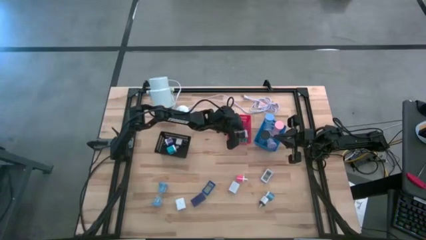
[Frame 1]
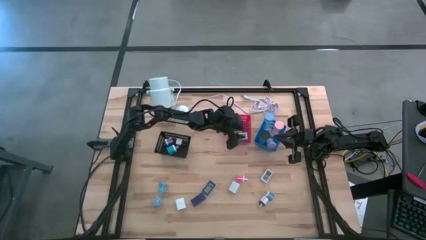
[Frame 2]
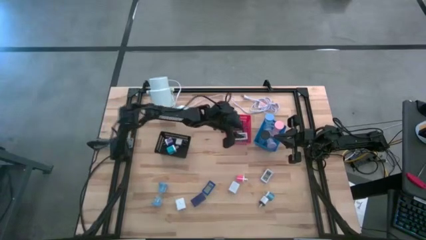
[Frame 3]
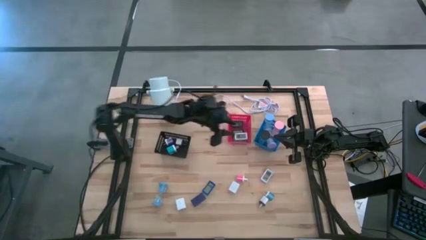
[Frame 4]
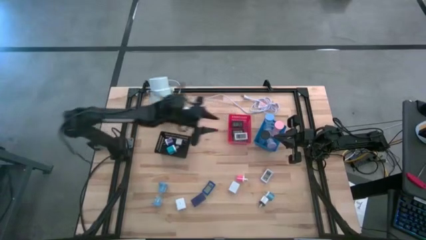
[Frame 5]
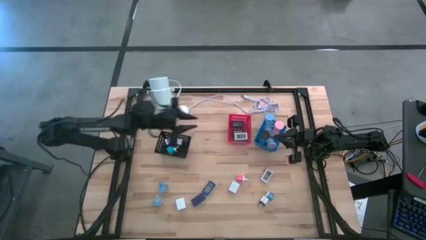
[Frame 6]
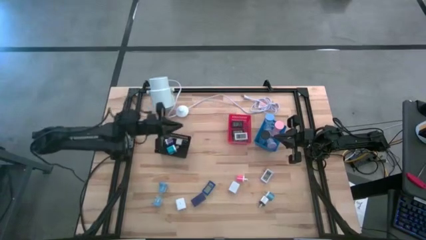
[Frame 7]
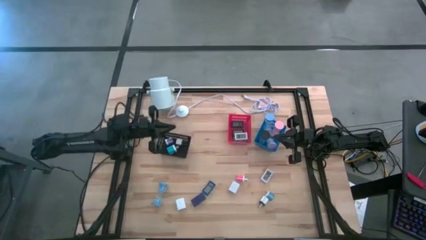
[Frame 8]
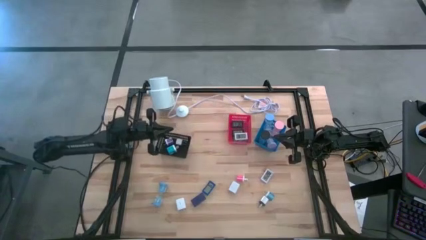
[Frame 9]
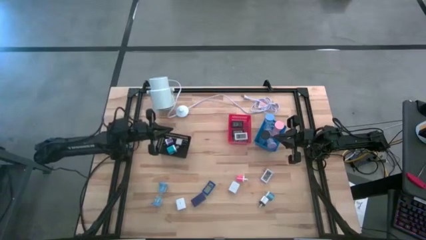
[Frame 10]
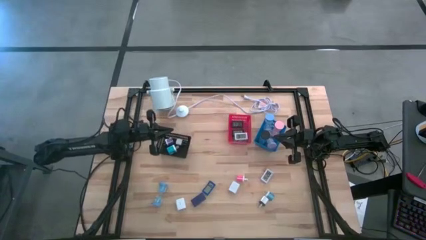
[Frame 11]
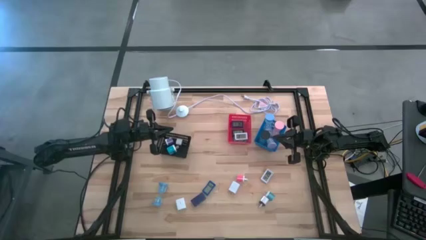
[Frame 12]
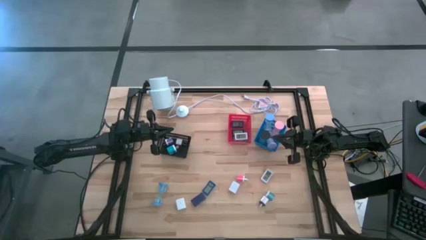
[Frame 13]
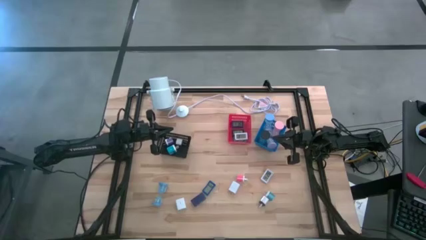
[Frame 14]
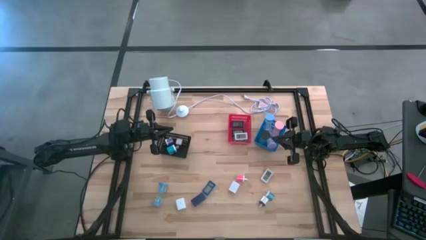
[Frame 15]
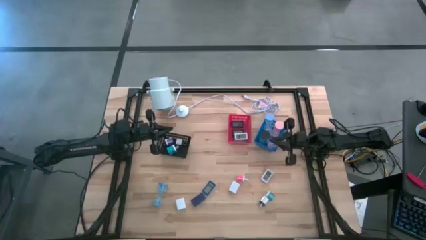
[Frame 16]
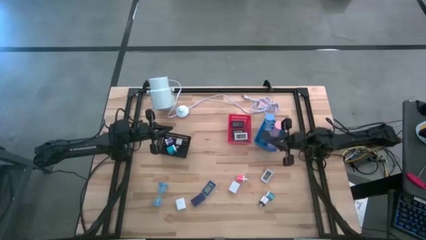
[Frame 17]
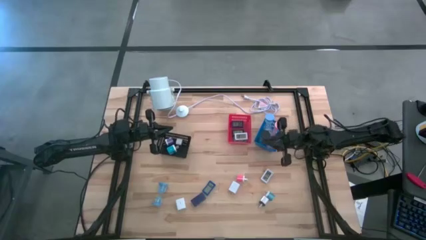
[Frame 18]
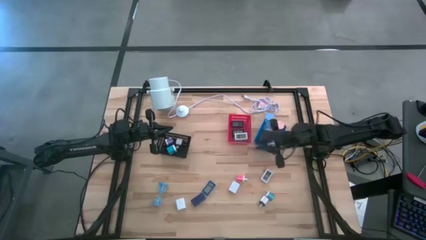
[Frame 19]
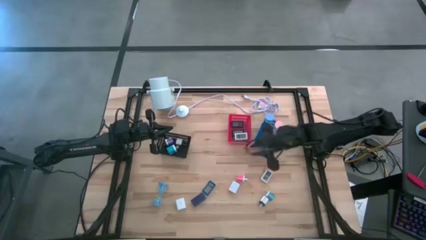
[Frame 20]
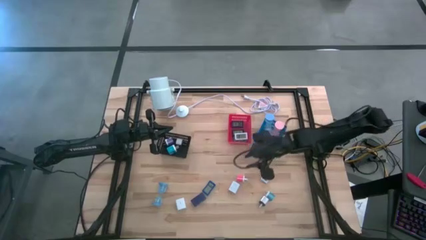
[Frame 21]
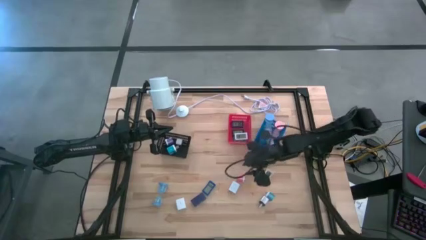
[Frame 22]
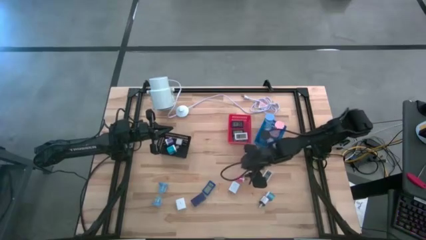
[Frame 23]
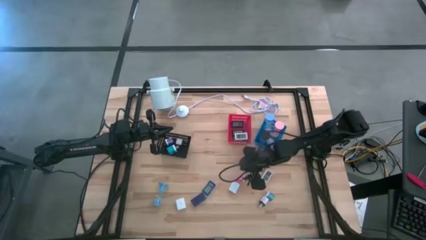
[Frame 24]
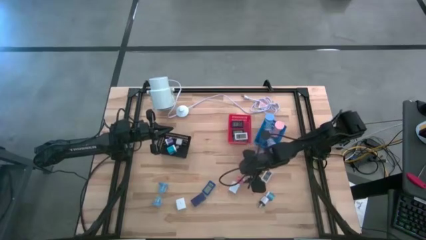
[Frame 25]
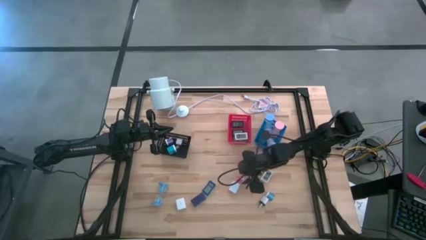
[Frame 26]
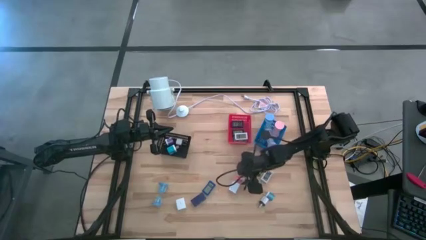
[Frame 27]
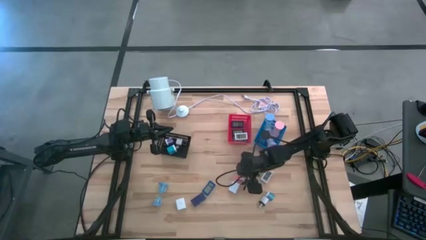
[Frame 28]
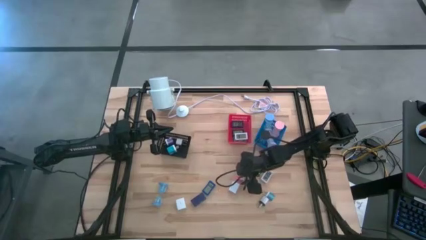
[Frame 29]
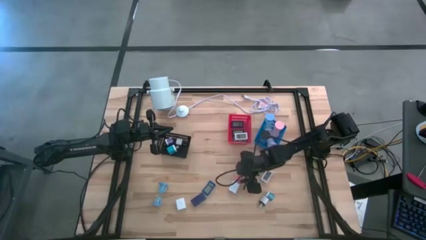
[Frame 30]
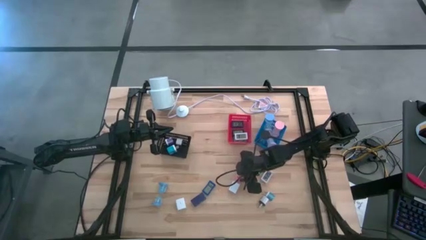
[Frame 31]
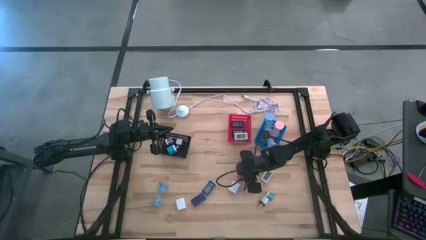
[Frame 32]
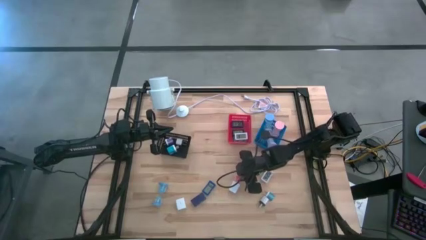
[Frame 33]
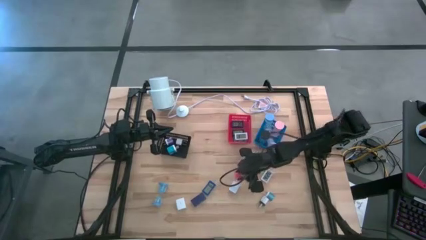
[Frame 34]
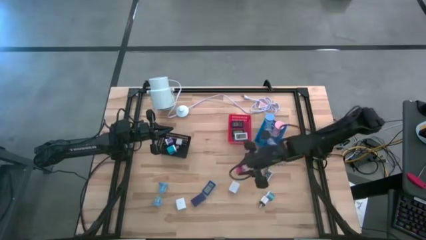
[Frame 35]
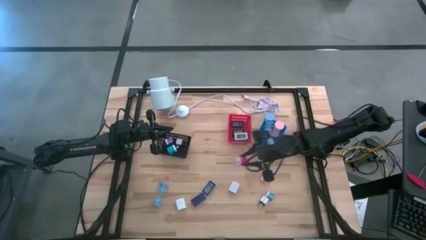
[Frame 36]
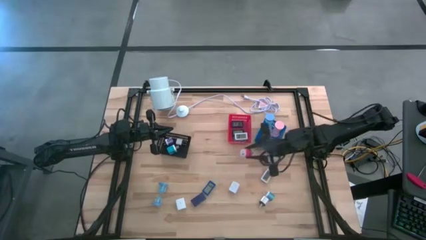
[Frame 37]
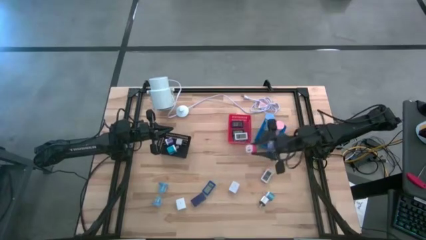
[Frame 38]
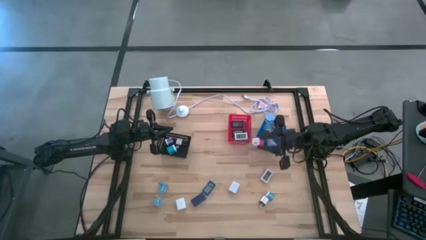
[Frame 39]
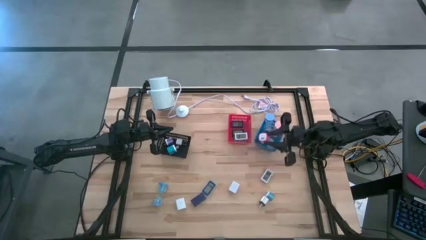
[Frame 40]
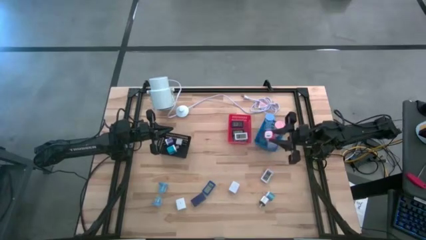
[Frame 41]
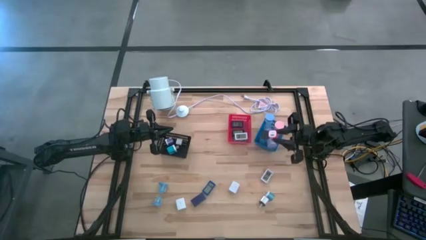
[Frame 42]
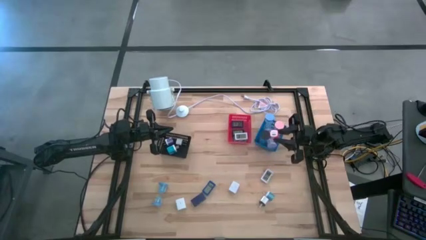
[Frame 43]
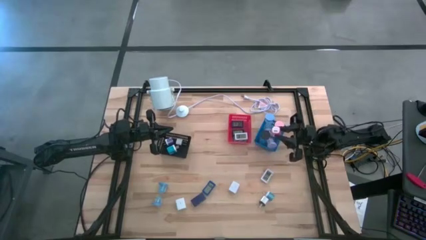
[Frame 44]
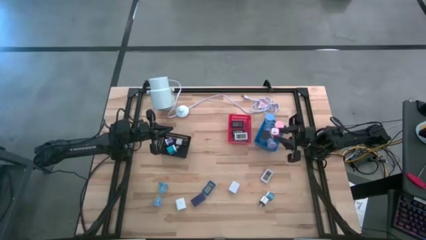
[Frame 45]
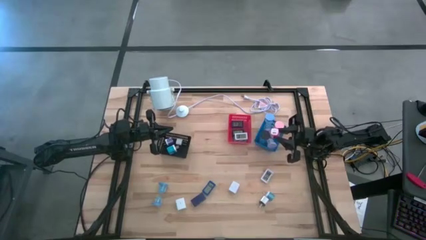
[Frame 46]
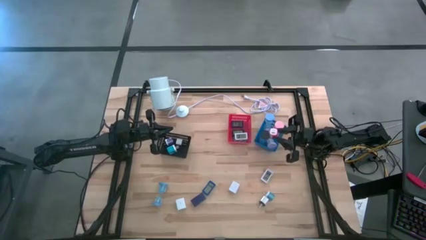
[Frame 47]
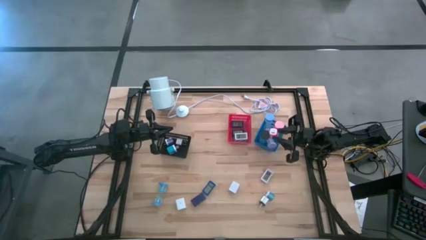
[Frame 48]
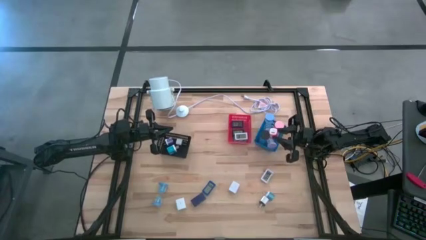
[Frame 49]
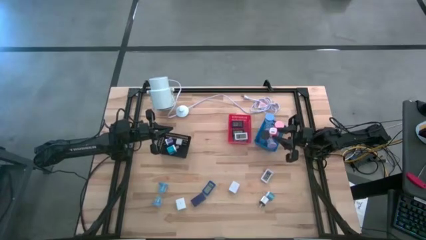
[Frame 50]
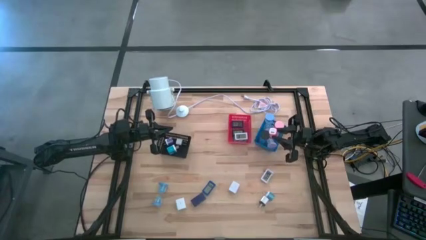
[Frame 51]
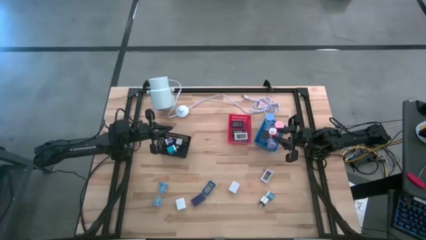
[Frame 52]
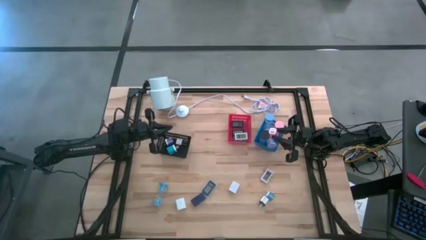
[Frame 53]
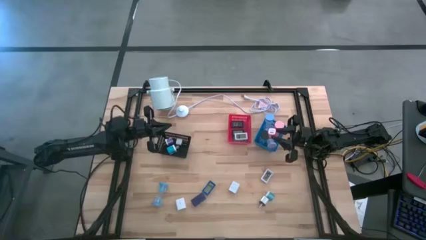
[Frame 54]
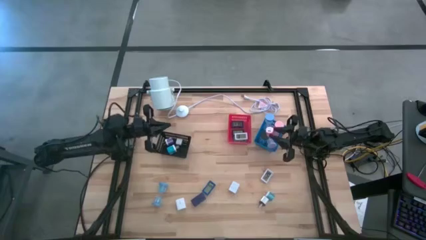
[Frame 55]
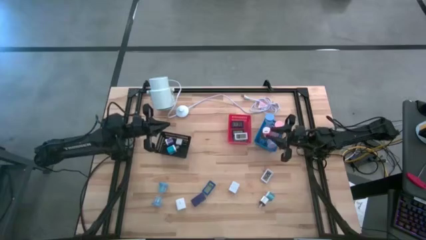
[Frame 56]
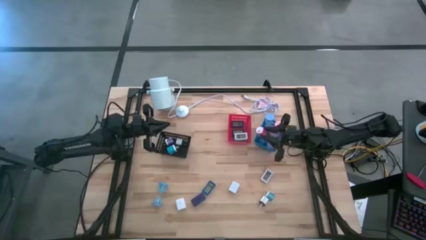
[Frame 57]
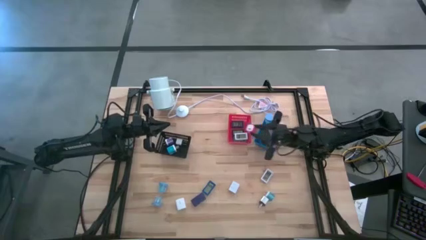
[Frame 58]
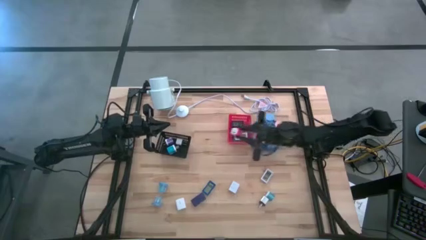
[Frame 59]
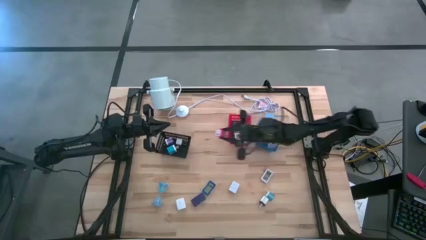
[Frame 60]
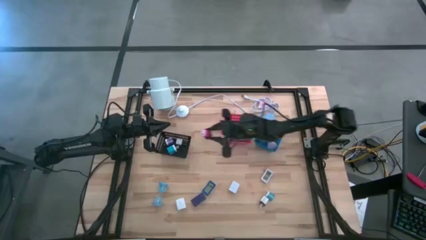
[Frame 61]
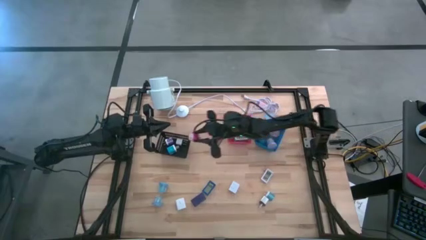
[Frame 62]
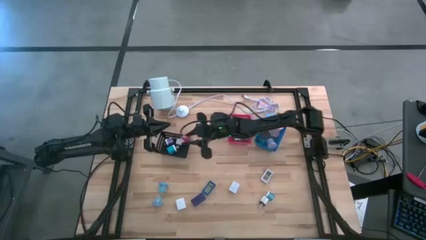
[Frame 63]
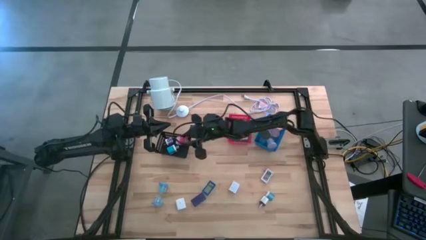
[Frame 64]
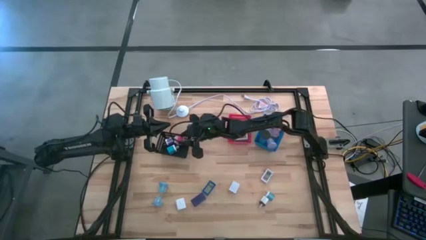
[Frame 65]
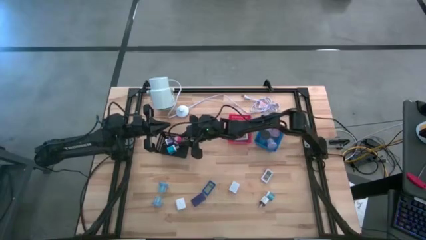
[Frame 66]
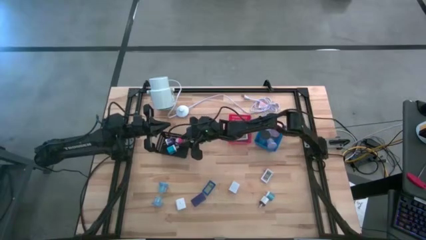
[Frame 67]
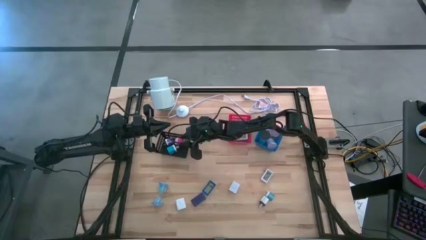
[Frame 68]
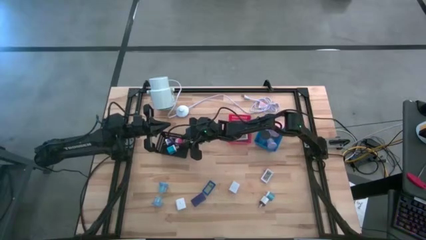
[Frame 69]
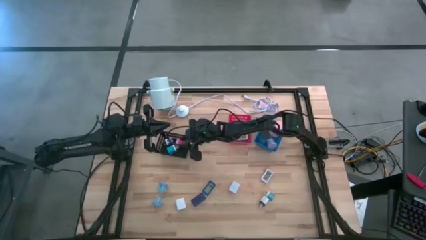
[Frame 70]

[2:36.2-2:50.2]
Task: Pick & Place Office items
Put the pink charger adaptor into the black bin

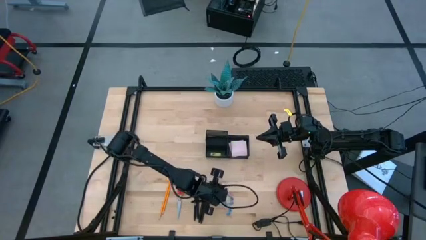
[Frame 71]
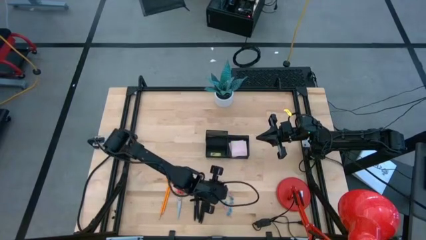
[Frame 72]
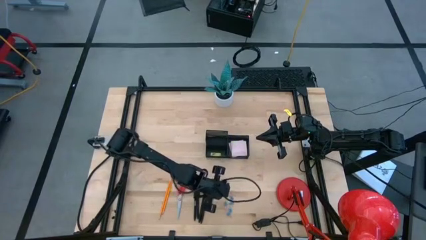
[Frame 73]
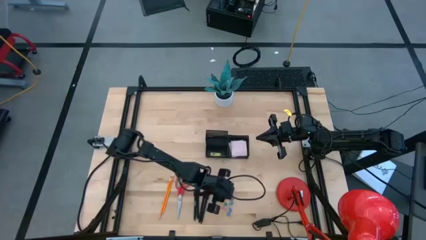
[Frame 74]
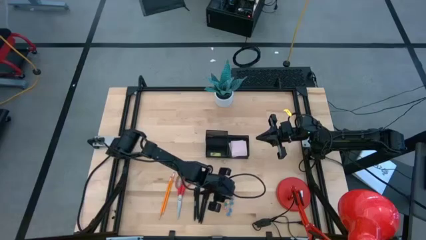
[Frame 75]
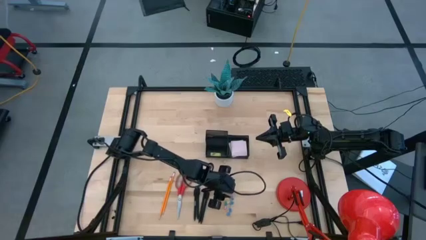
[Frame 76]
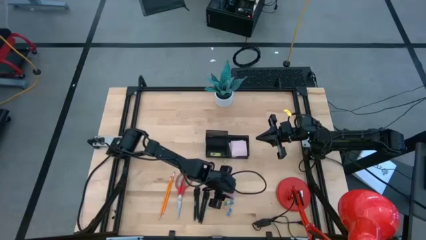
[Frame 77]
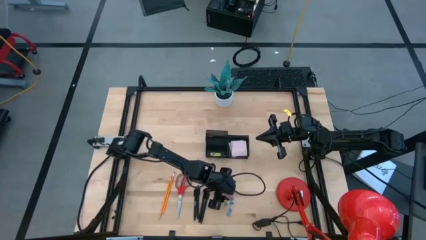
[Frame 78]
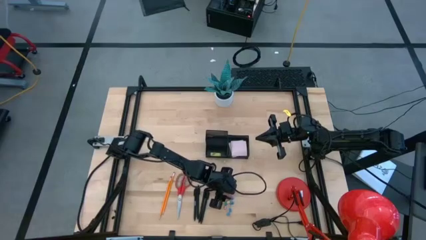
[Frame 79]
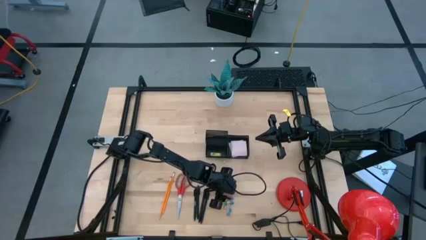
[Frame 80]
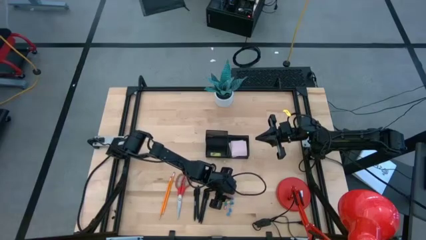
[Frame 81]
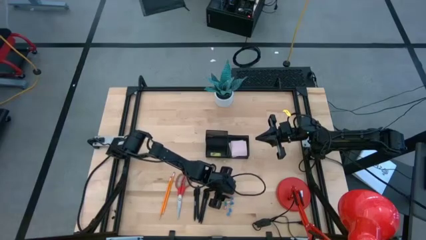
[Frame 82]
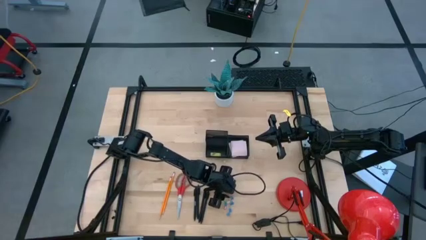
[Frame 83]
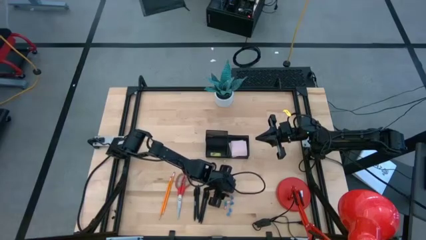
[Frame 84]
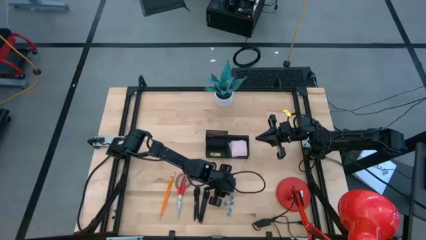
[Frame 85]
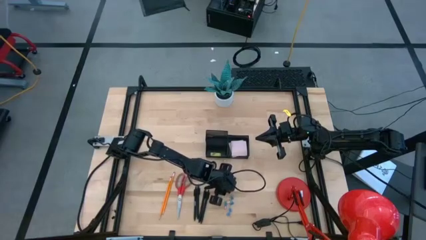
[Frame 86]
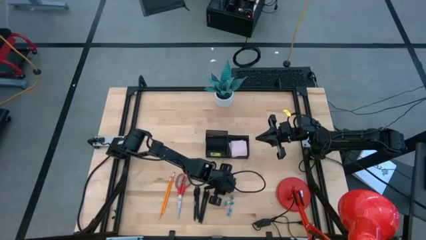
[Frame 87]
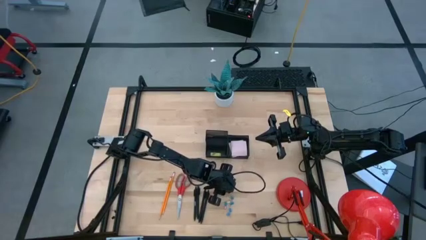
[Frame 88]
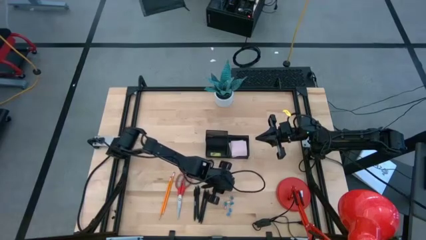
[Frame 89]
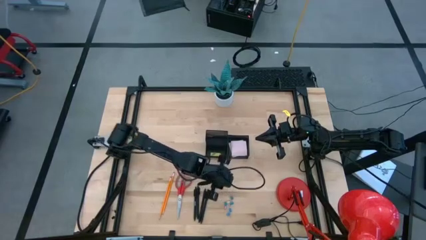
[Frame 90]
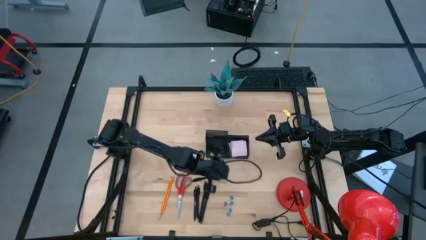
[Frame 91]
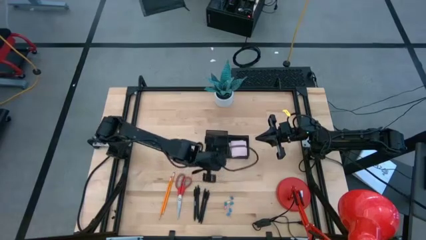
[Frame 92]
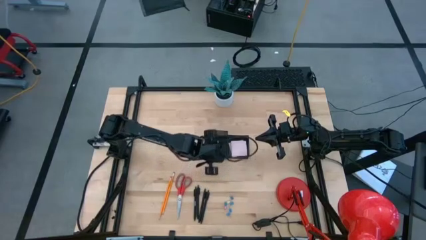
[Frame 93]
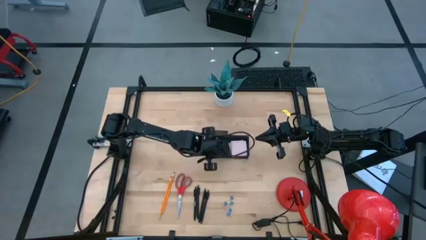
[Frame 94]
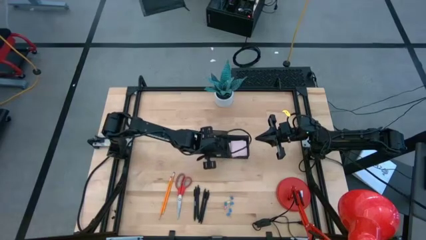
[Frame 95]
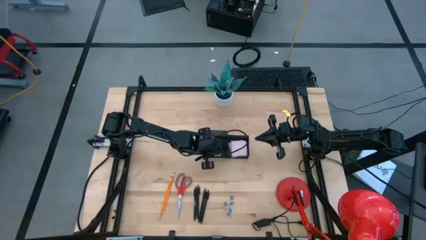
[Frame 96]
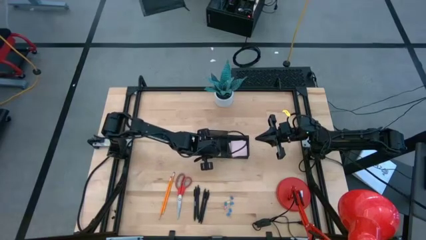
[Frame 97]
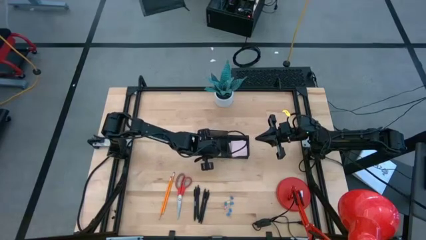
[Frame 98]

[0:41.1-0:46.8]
Task: Pick and place office supplies into organizer
Put the pink binder clip into the black desk organizer
